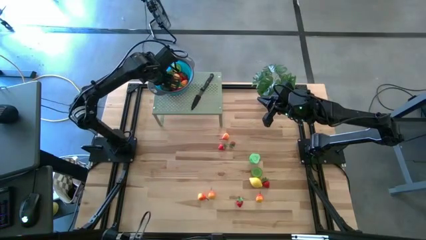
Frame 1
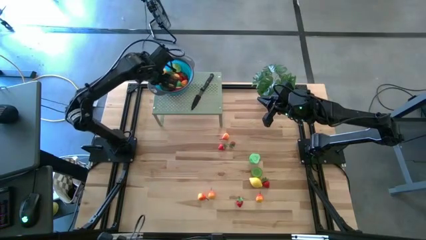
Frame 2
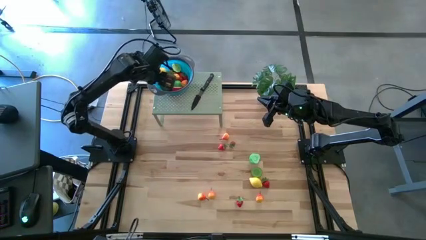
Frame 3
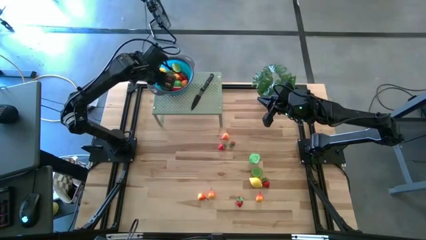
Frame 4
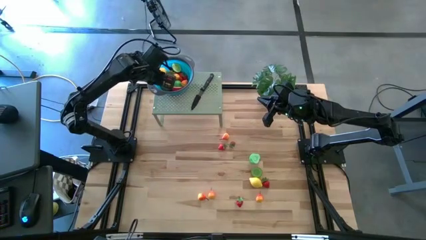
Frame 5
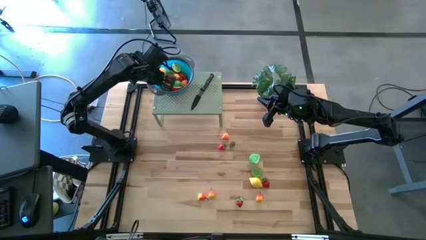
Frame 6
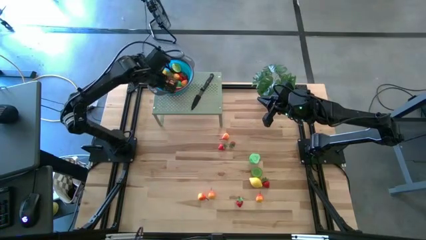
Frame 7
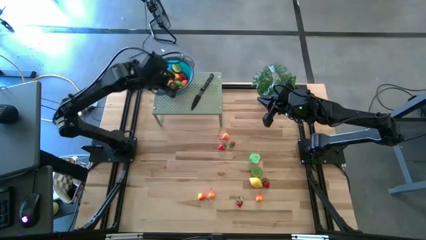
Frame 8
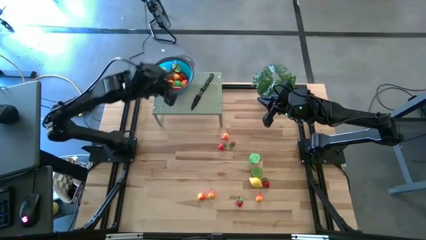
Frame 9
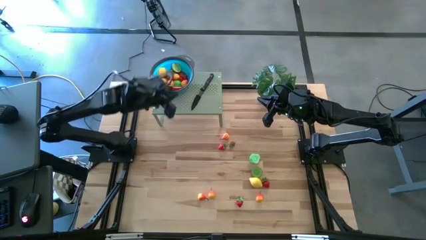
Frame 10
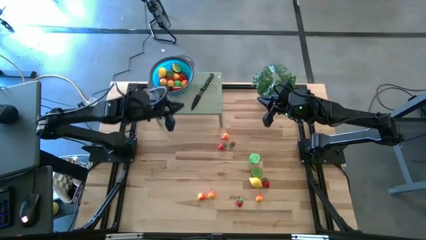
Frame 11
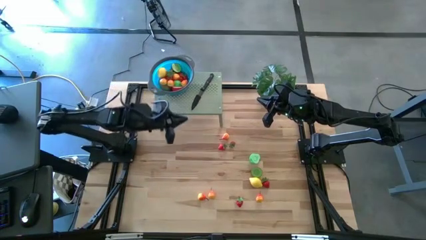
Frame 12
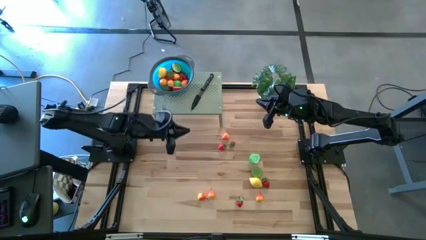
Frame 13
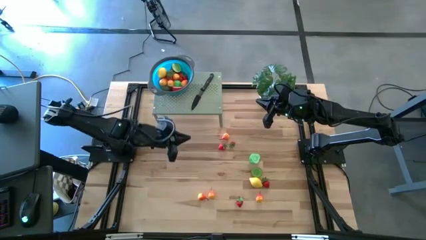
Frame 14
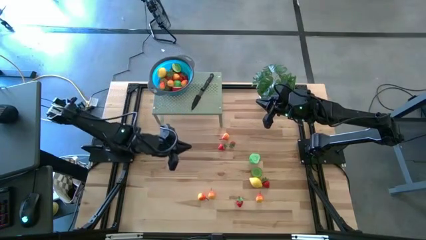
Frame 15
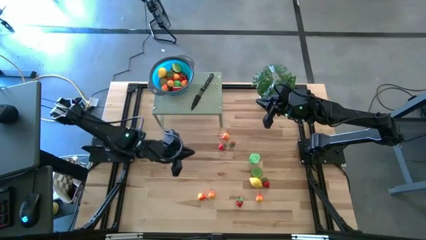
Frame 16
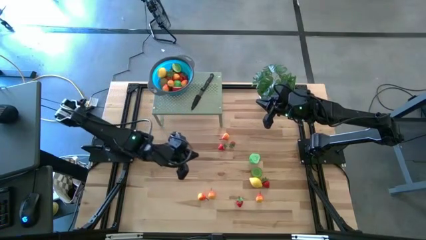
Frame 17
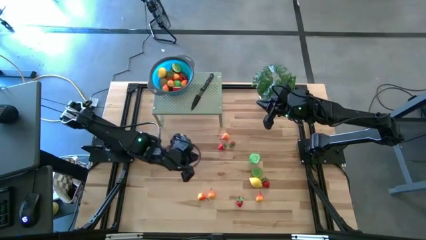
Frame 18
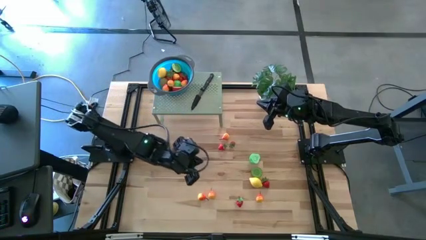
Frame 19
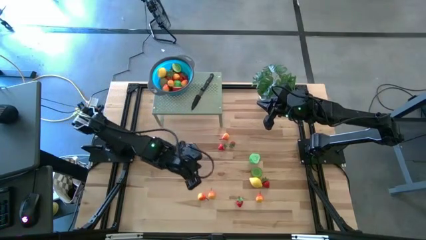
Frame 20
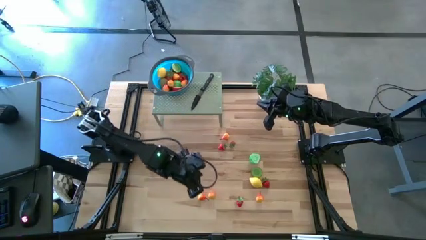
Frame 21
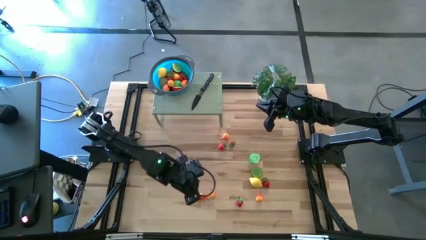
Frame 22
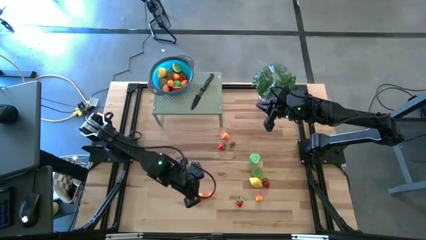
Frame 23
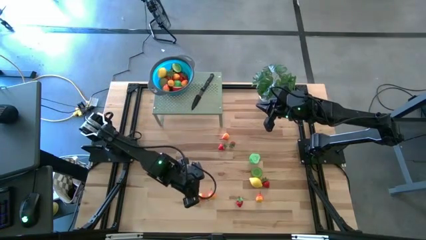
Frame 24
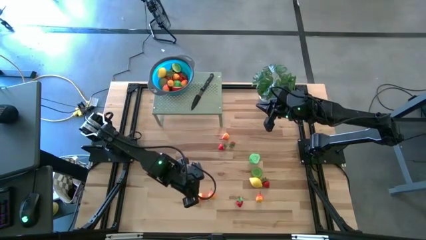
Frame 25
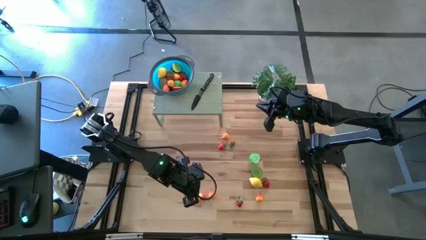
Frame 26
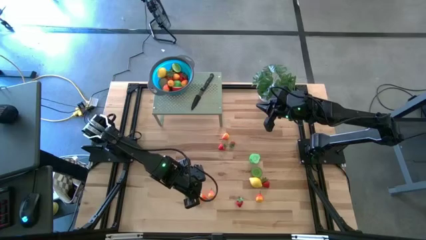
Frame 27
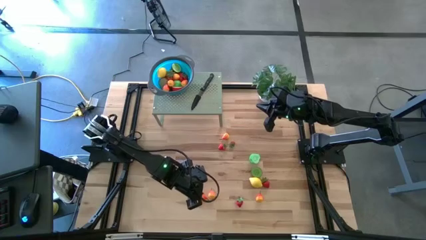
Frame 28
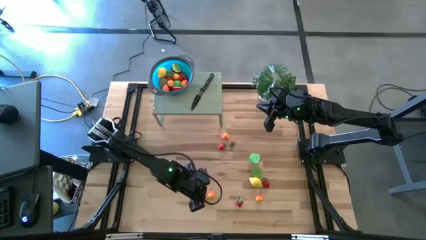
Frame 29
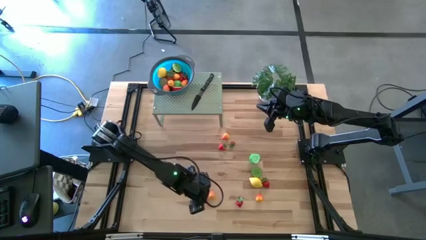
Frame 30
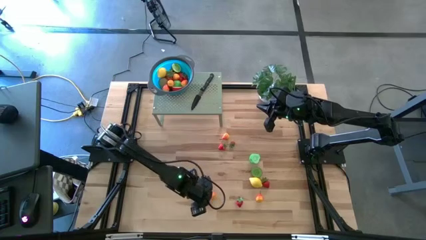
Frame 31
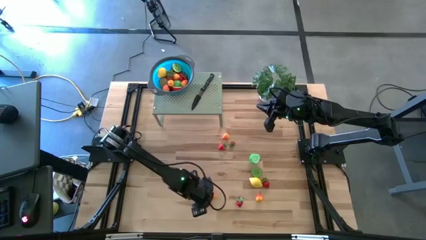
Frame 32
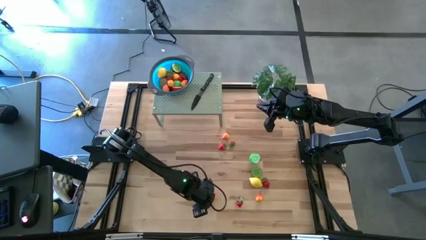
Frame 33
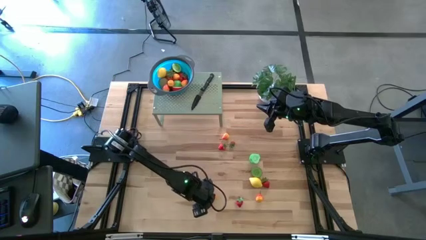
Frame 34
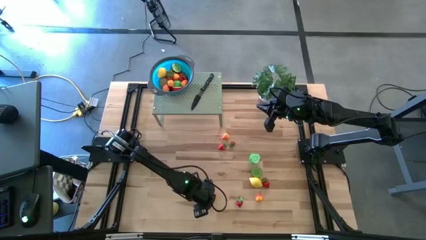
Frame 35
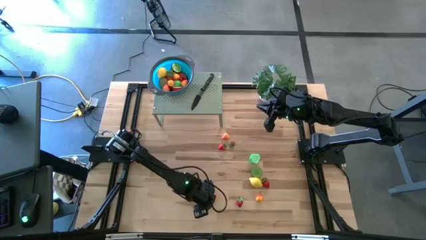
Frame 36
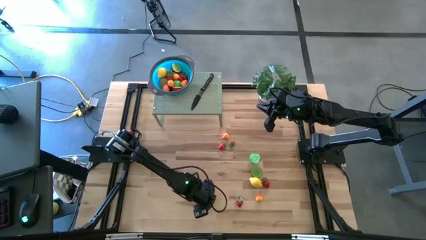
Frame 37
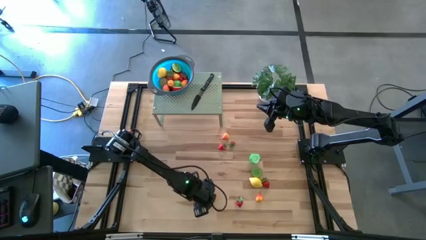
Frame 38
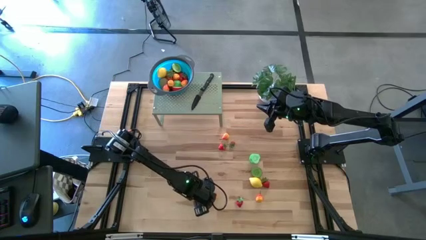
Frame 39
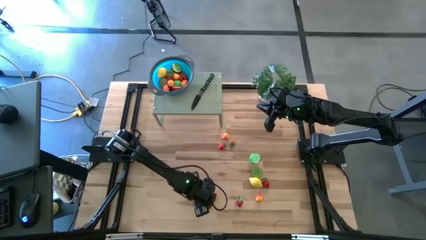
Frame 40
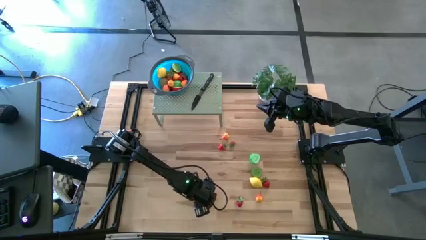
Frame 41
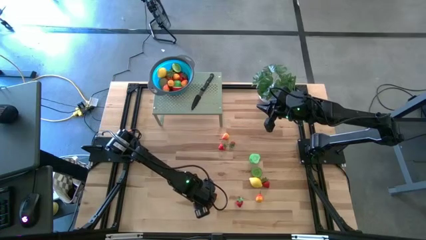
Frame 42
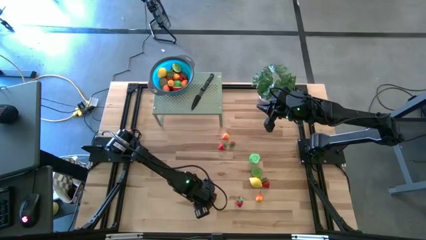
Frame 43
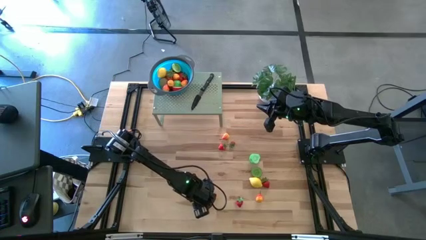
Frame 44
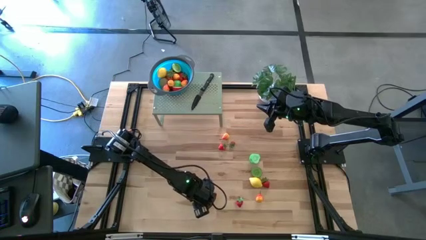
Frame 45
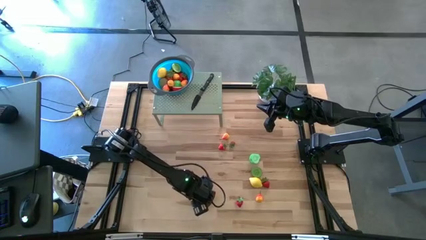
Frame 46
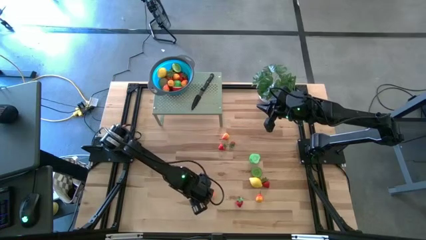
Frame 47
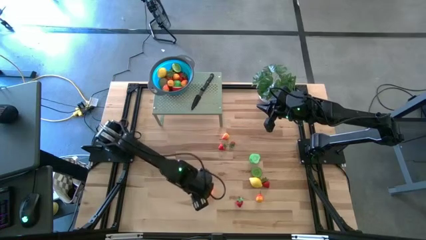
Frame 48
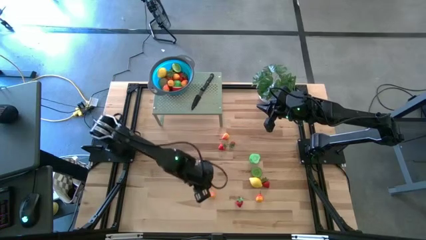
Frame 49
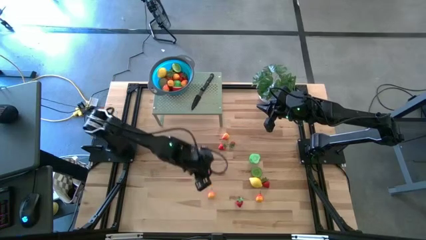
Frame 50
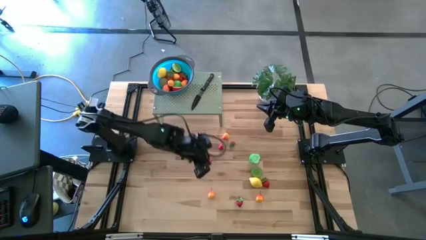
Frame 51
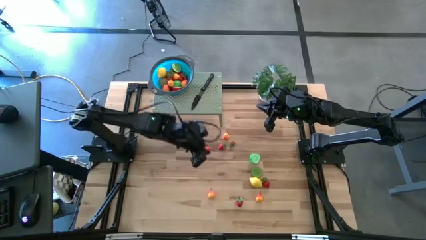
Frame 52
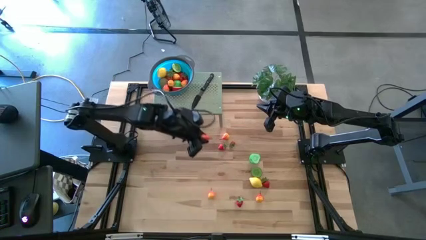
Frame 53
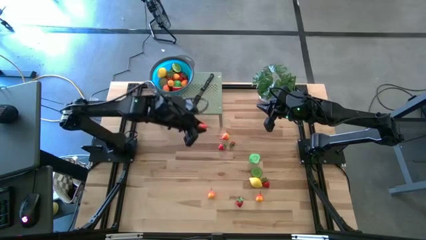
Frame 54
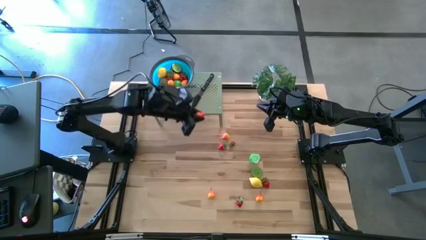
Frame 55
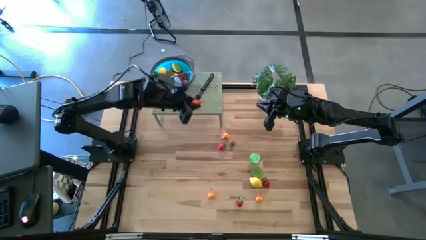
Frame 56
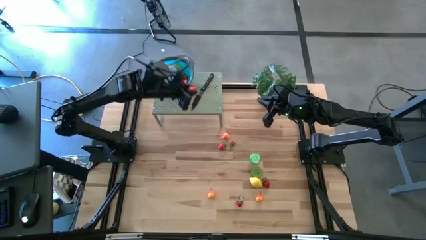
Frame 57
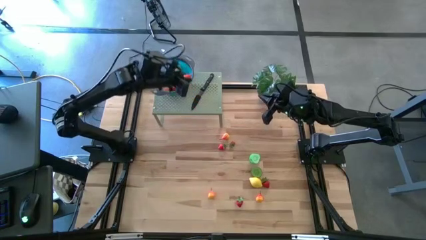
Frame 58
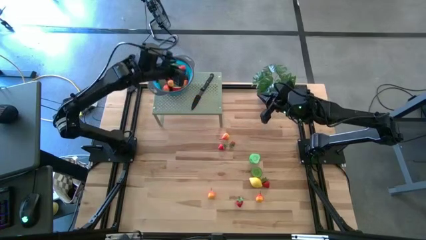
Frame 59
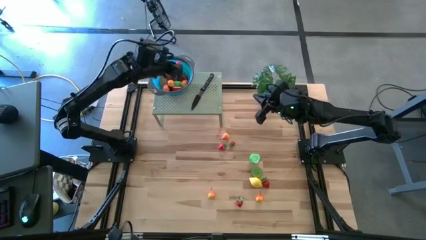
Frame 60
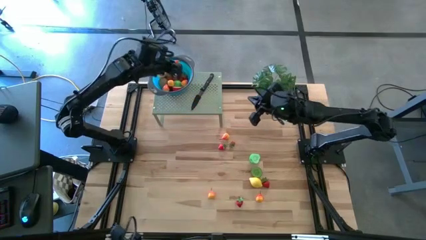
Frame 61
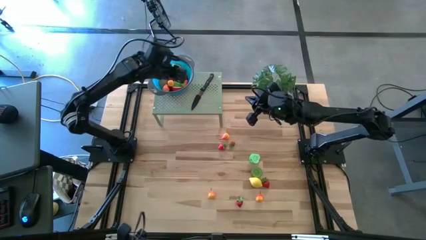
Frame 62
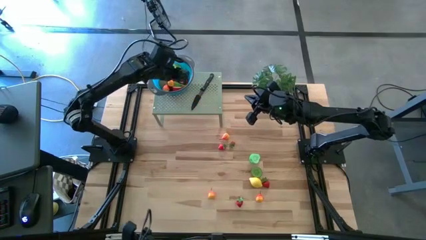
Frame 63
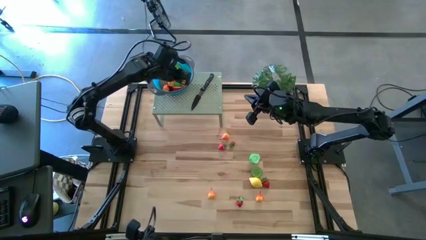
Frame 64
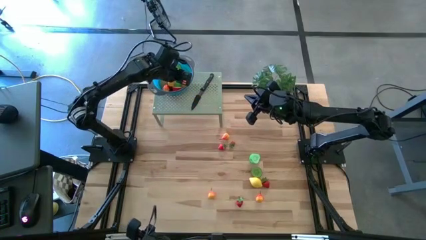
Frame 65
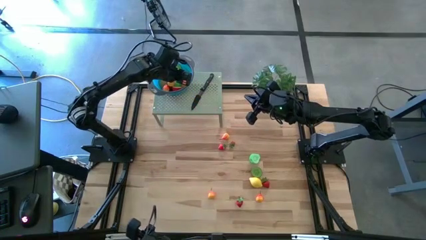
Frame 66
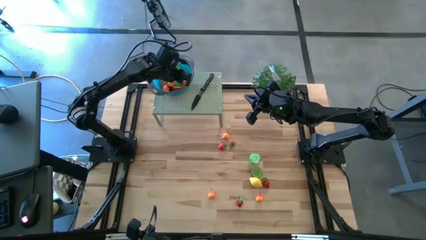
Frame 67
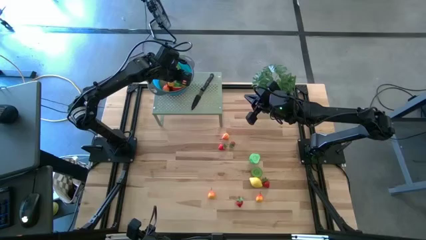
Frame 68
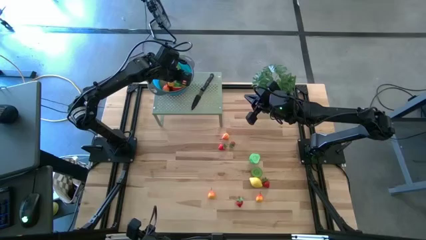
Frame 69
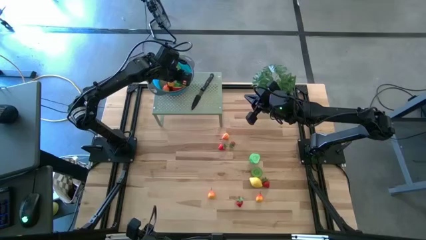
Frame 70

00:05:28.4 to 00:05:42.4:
Task: Pick & Place Fruit
Put the orange pear into the strainer bowl on the shelf

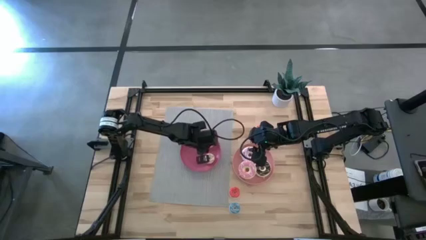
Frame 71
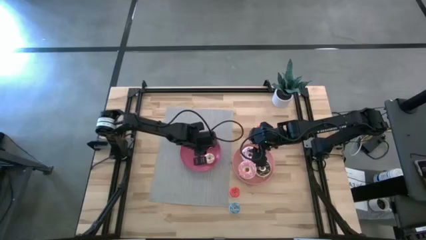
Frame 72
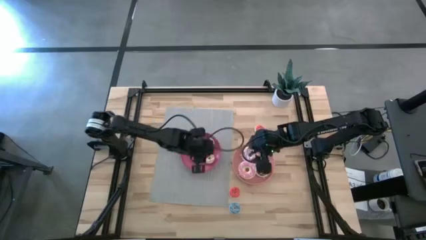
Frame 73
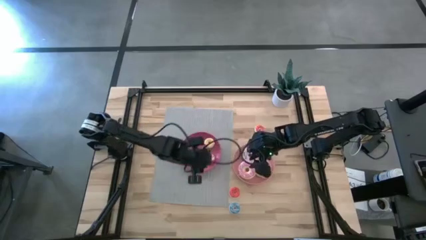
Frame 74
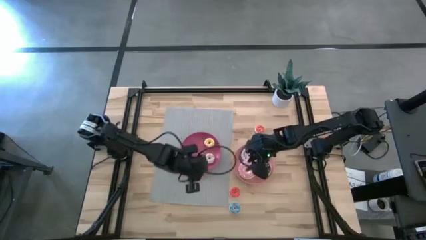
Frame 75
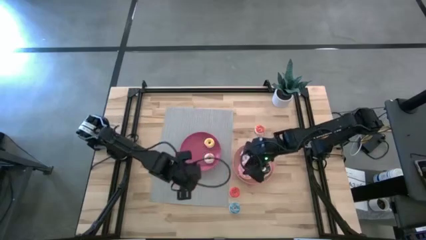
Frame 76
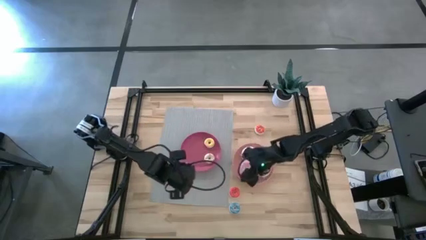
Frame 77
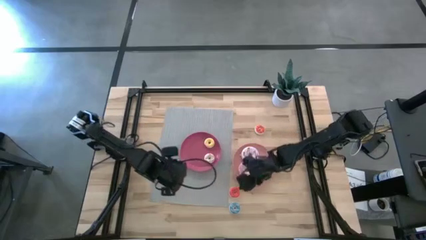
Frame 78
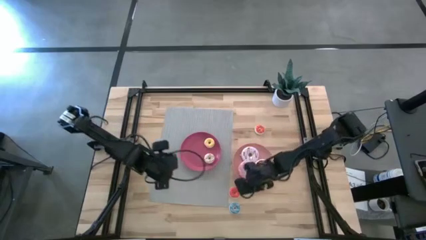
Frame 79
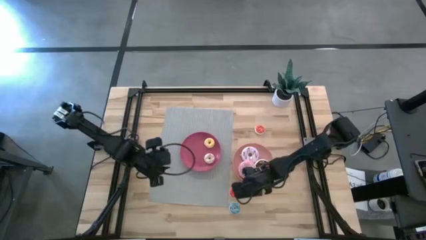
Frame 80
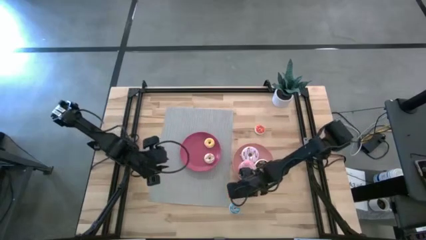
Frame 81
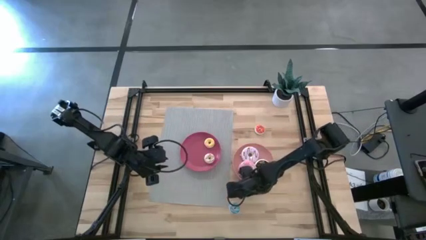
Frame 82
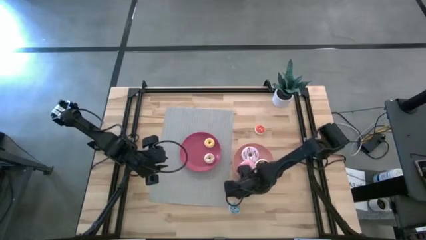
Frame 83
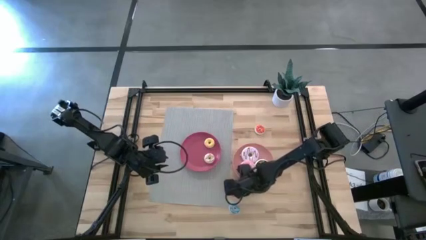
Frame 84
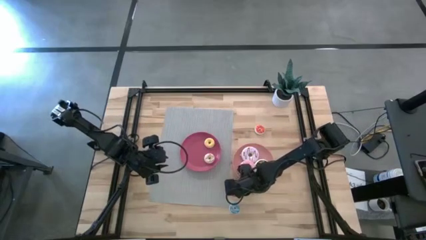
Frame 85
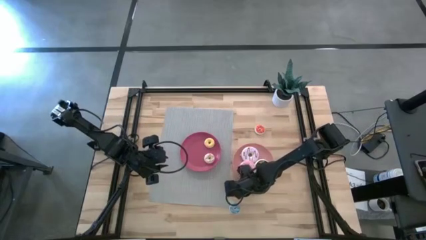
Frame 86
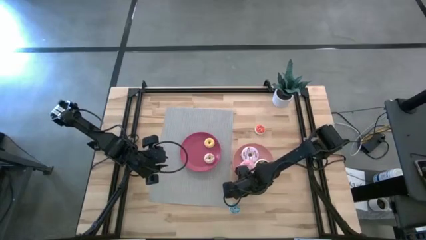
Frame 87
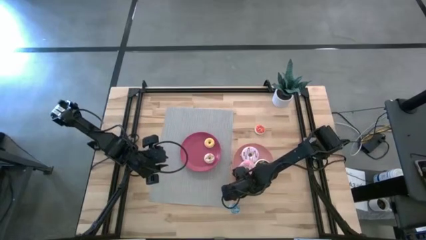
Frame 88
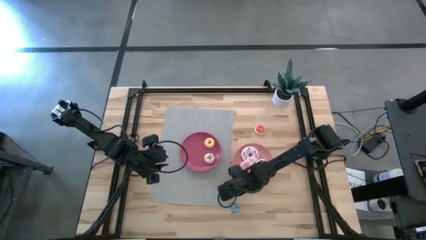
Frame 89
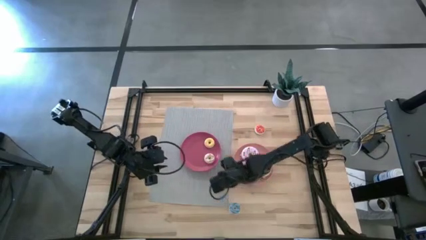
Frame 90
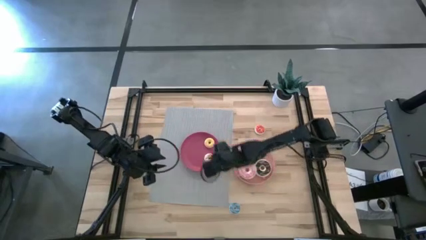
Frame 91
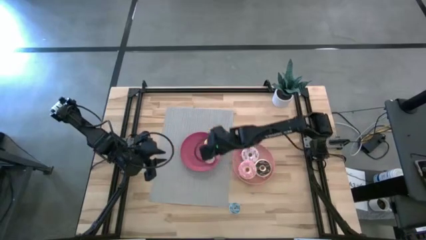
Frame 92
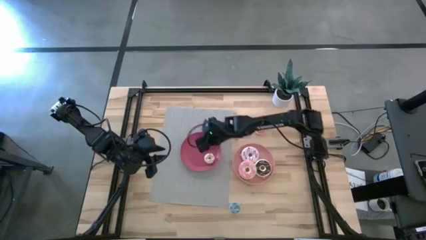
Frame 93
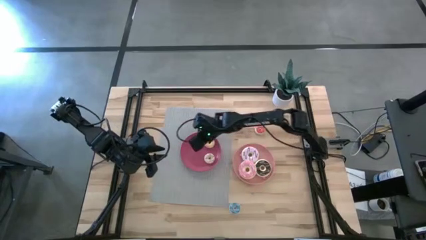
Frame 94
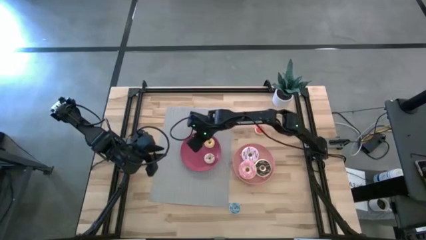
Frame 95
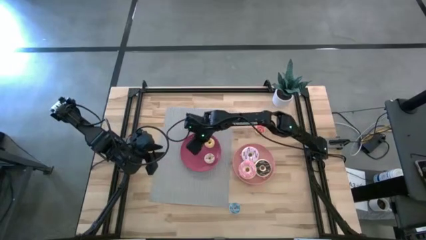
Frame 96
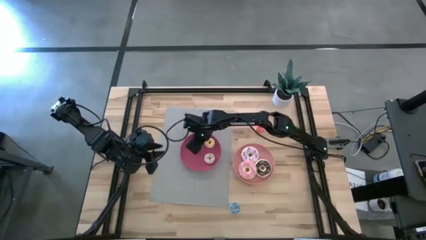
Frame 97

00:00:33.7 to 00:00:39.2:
Task: Pick & Place donuts
Put the small red donut into the pink plate
